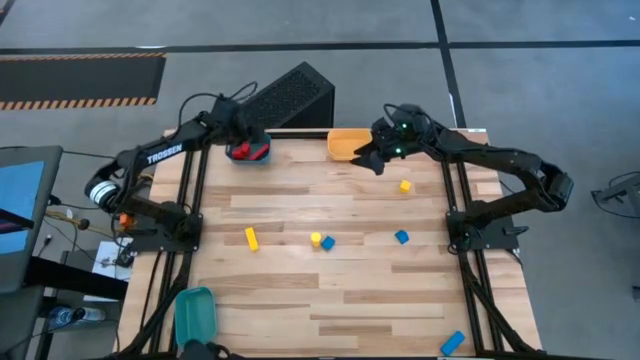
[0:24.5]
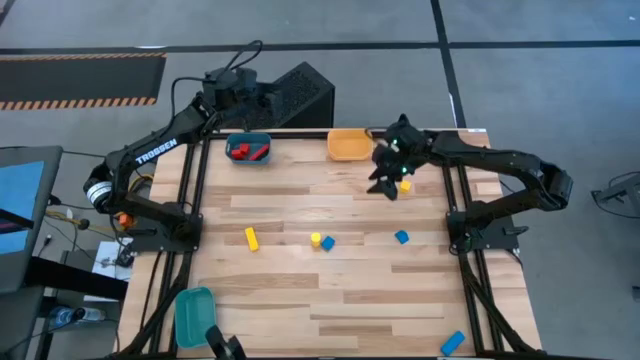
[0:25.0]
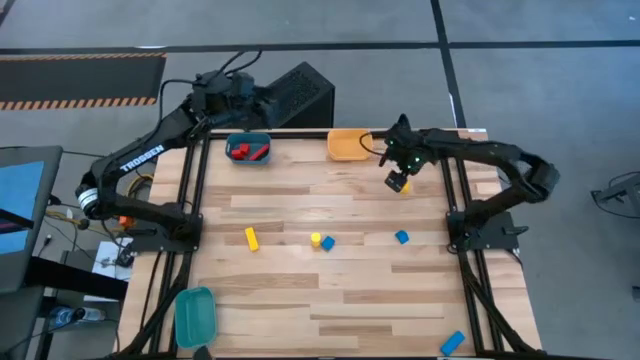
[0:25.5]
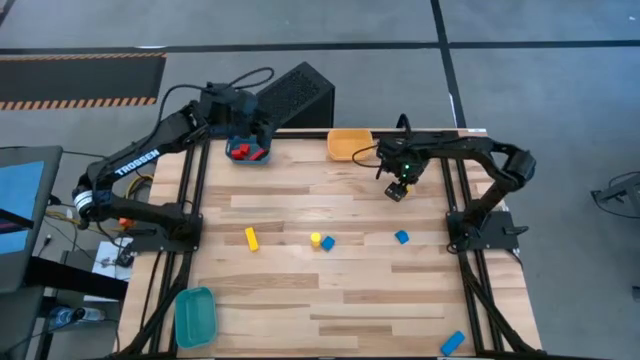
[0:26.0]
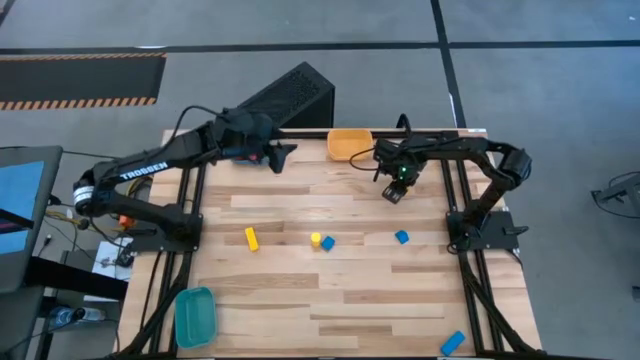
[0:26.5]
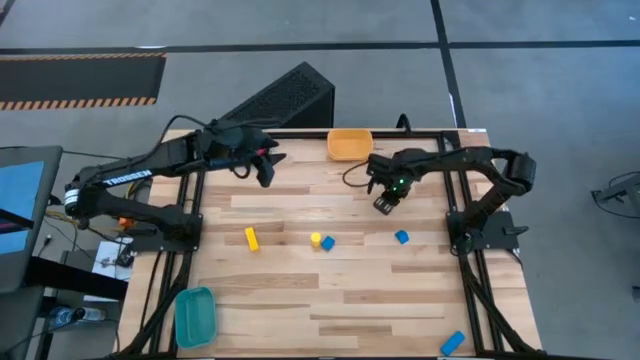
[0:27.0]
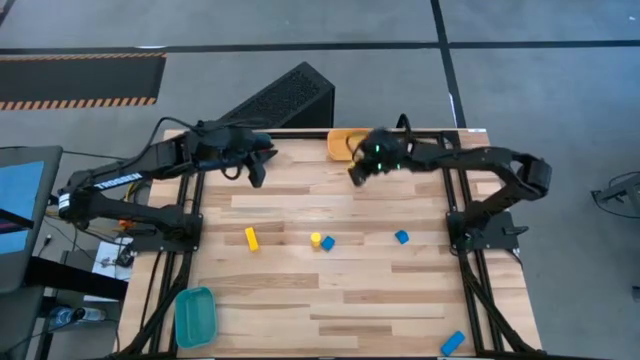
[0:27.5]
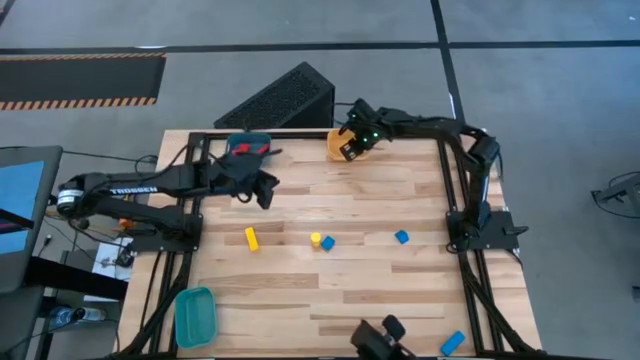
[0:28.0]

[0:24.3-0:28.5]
Task: Sort & place blocks by color
Put the top yellow block into the yellow bin

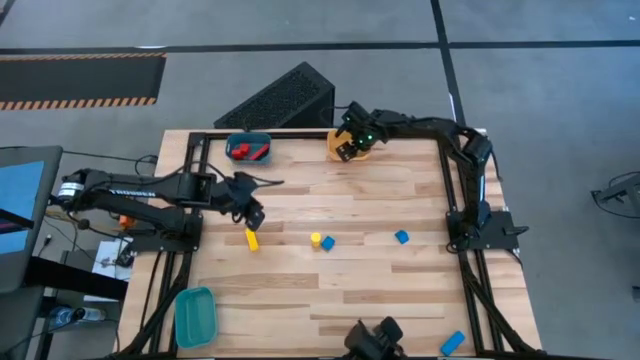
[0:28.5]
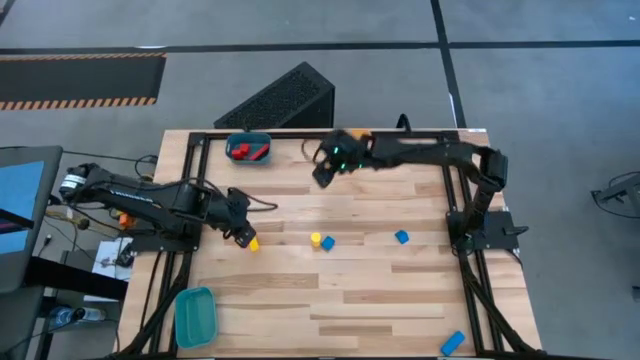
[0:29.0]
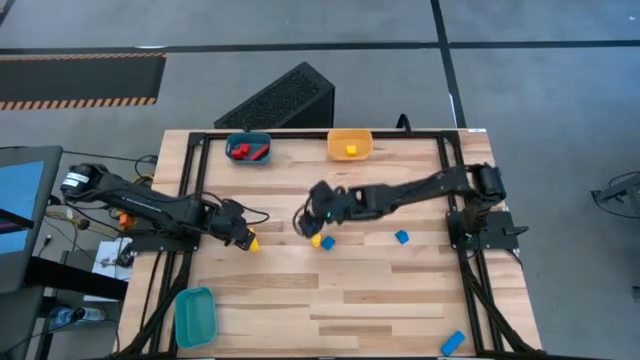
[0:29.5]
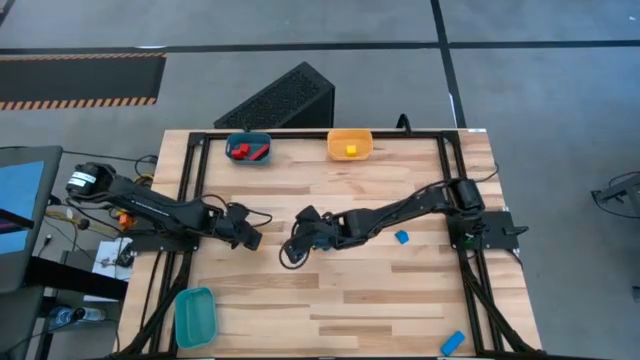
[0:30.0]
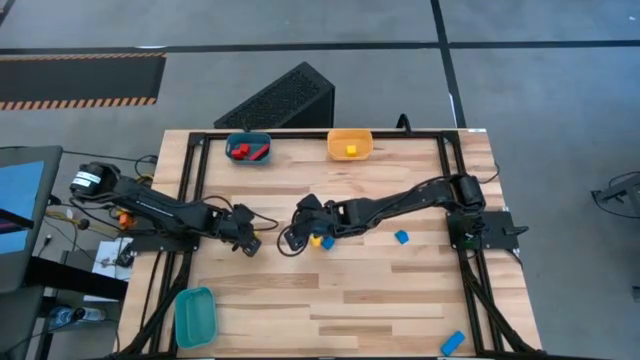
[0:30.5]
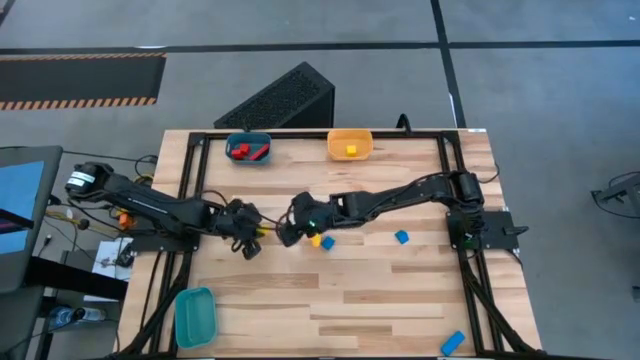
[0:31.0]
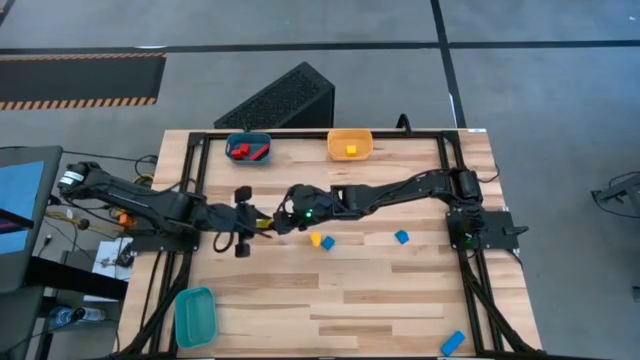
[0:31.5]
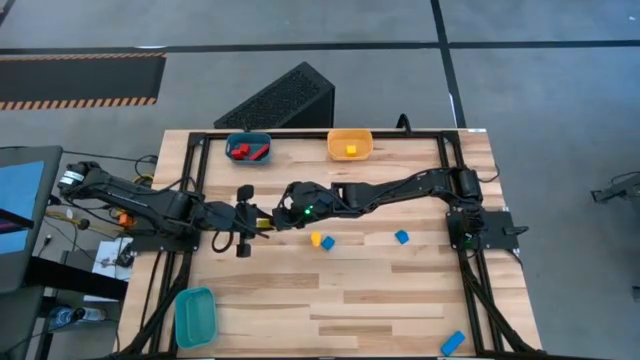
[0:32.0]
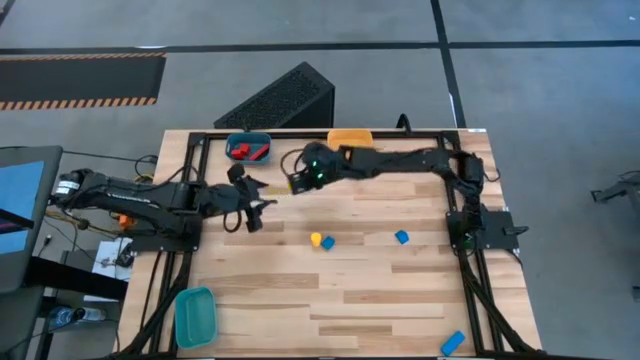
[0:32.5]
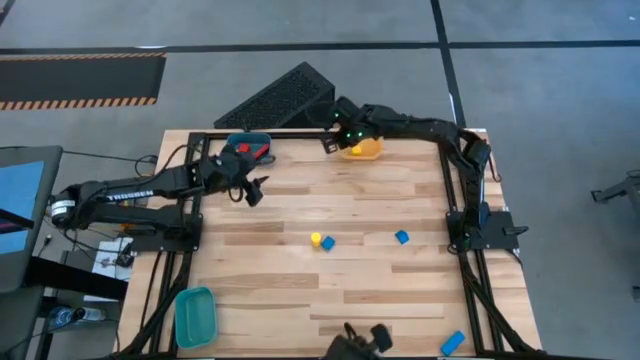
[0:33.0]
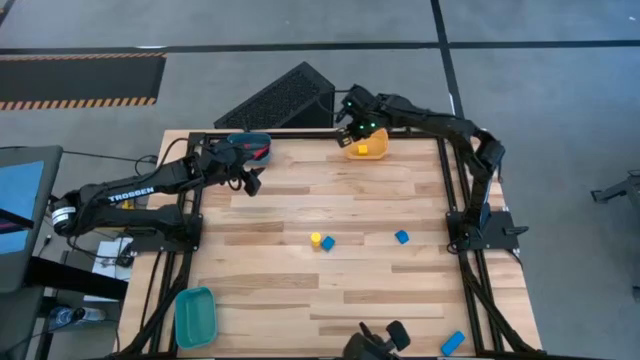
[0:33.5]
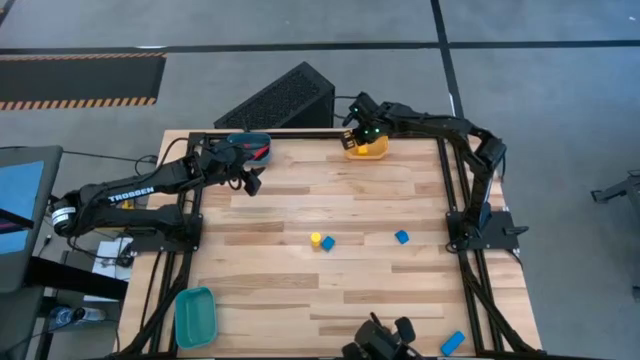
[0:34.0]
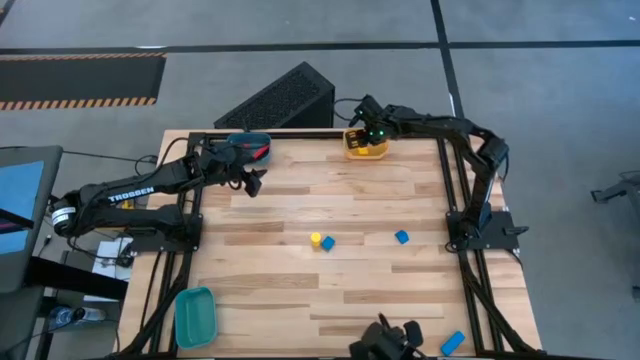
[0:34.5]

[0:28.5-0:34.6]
Put the left yellow block into the yellow bin

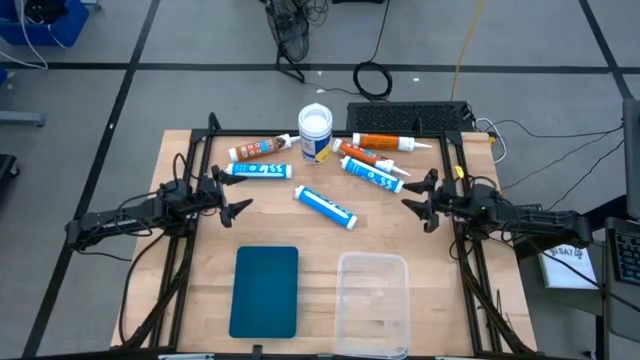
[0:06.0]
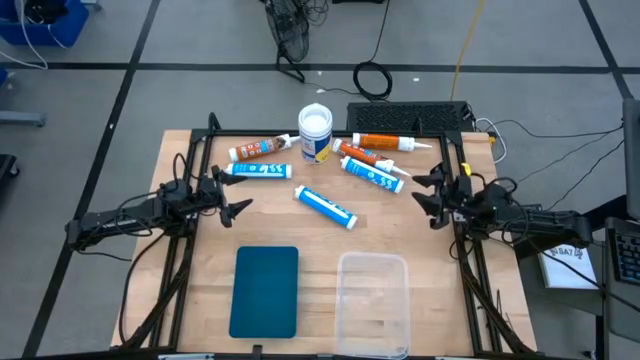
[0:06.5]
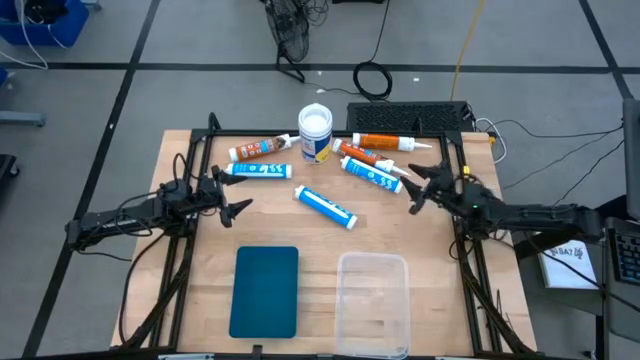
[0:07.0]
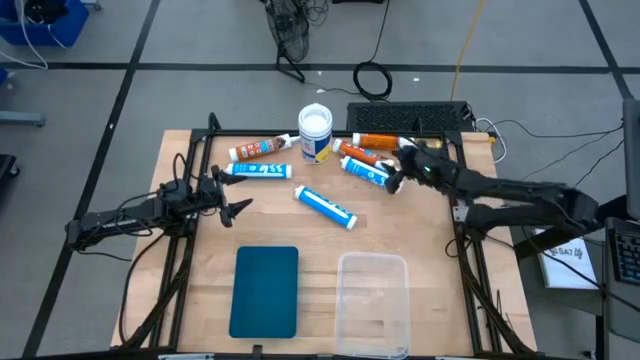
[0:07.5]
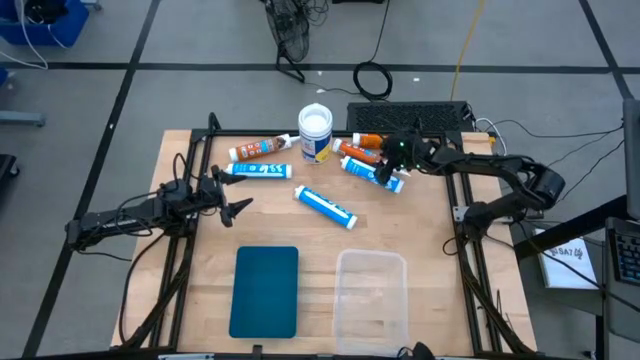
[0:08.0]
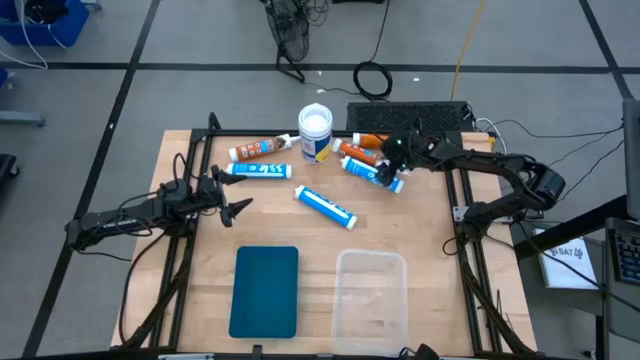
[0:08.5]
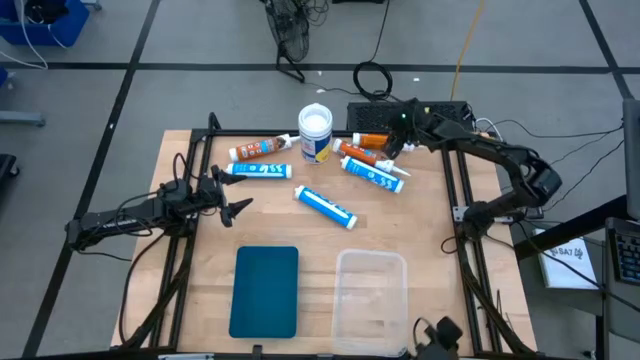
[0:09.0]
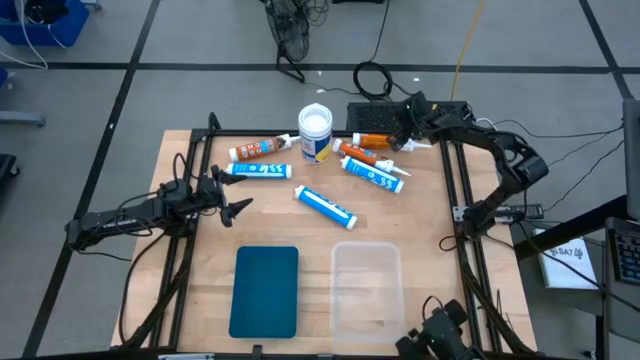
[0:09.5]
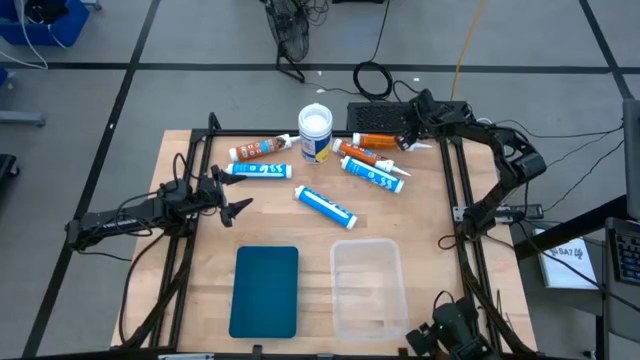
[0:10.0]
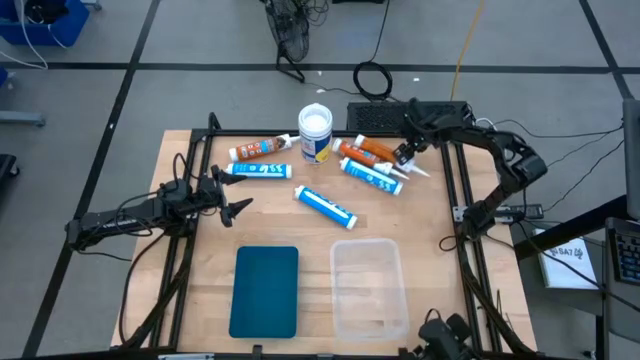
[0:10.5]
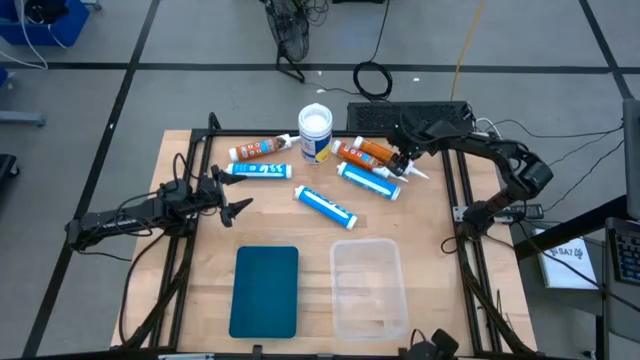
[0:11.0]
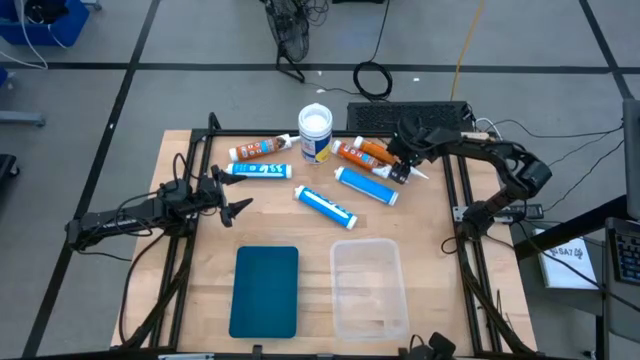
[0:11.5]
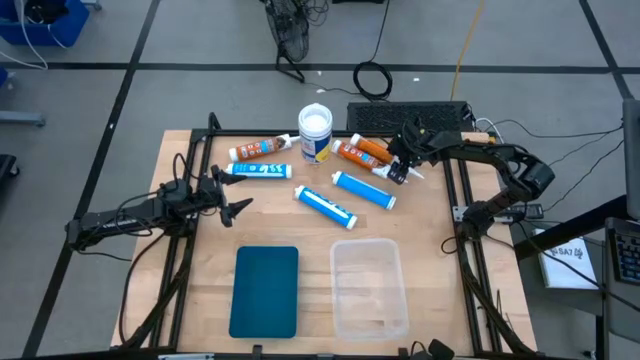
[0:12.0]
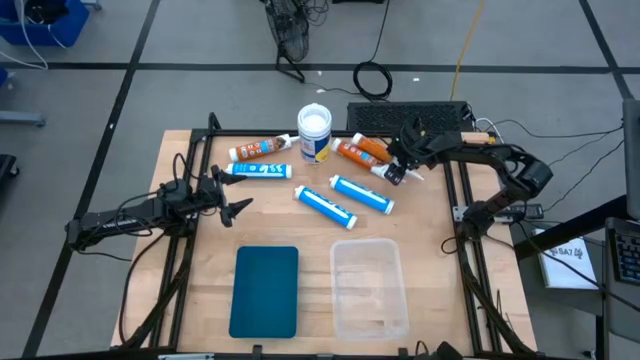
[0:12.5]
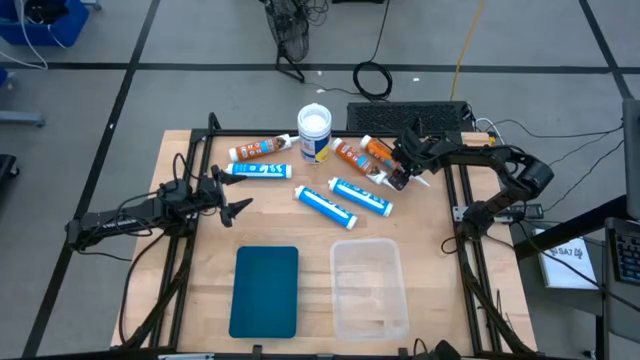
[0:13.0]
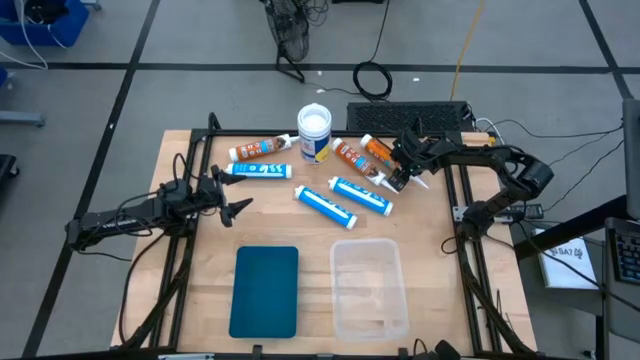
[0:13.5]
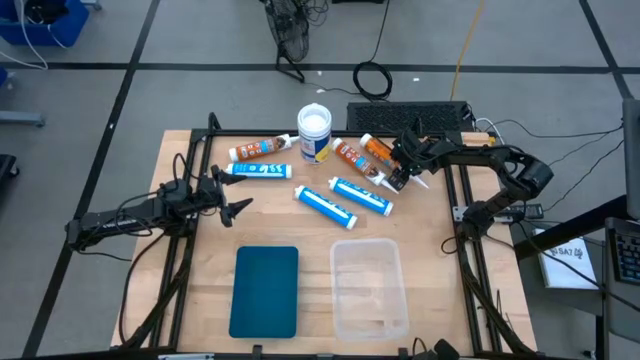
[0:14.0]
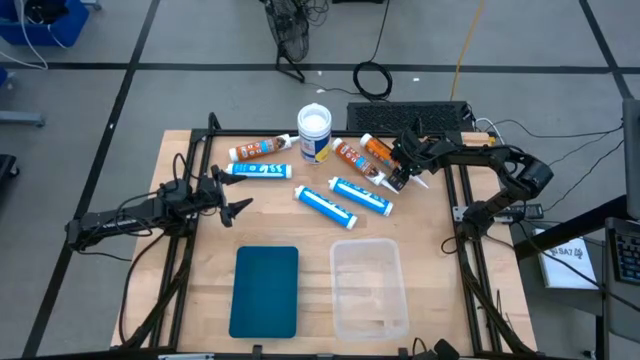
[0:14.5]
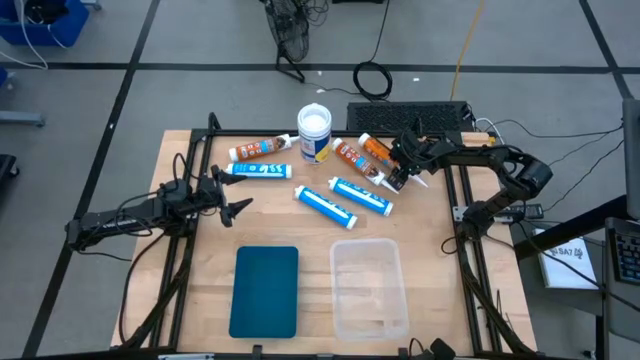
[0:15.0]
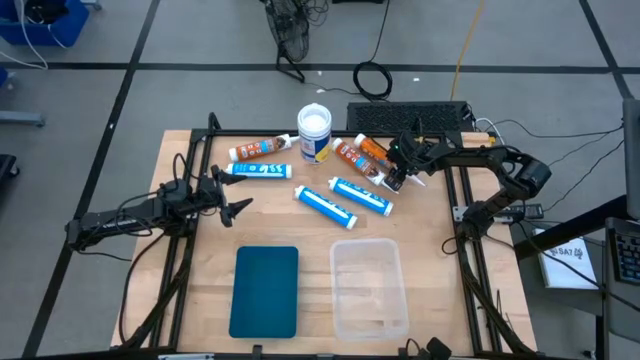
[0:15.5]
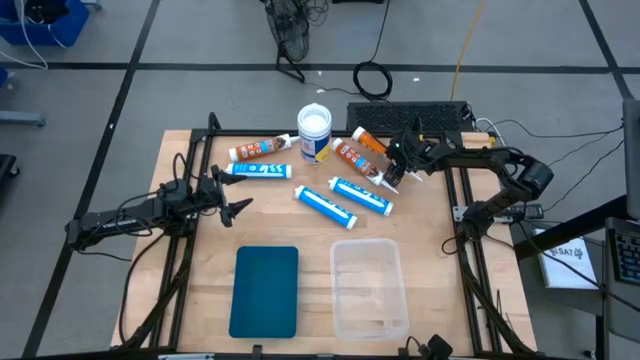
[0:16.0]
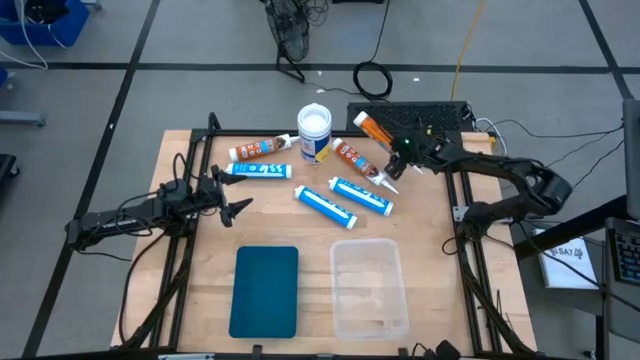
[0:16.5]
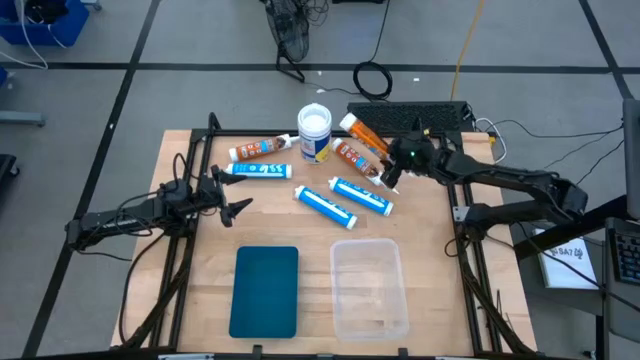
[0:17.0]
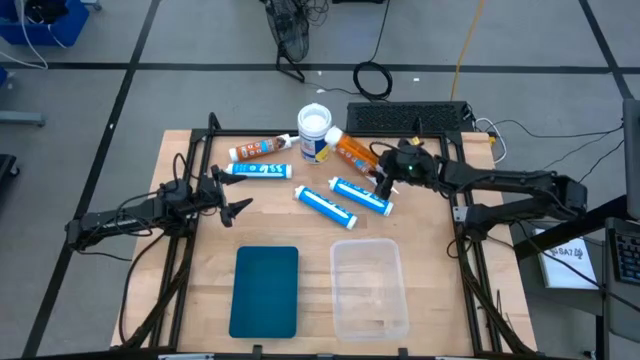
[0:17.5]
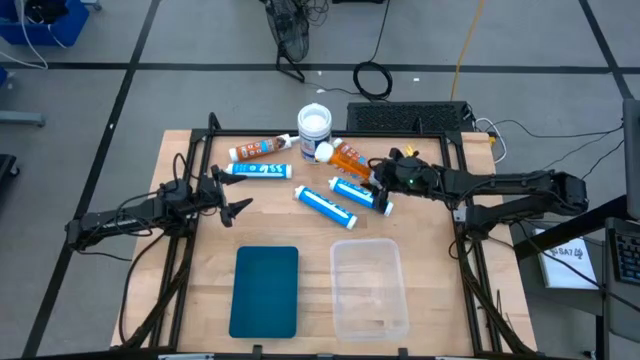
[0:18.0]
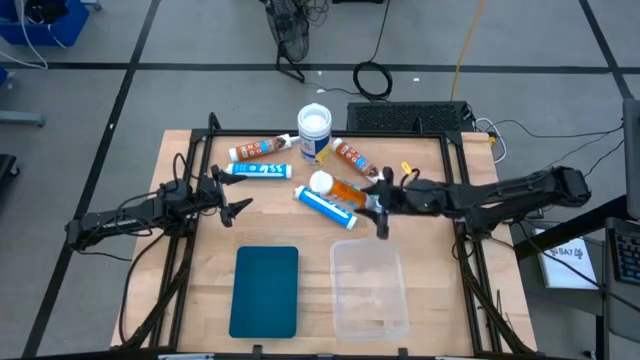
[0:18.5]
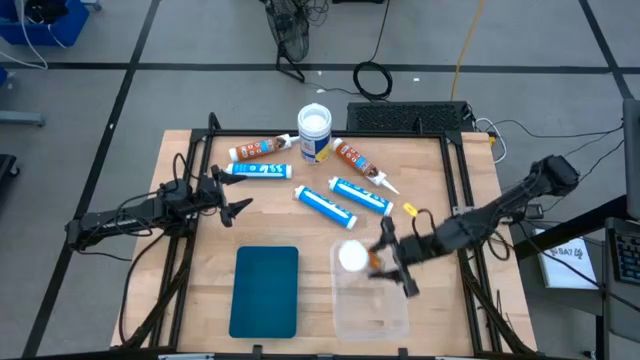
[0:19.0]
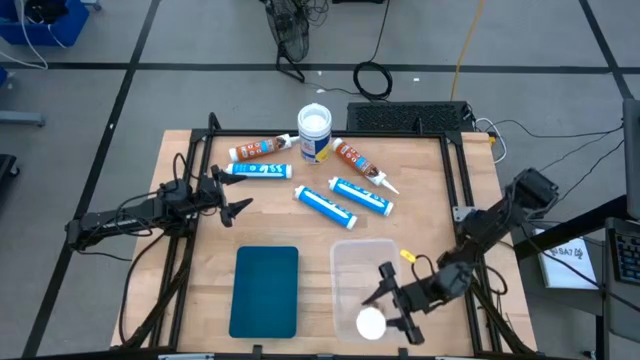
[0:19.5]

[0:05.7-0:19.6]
Task: Pick & place silicon tubes, Sealant and Lysol wipes
Put the right orange sealant into the white bin
